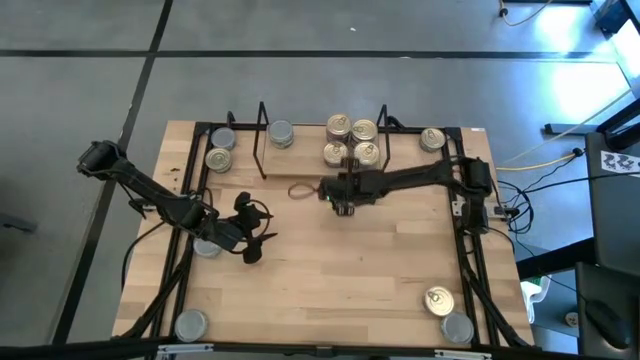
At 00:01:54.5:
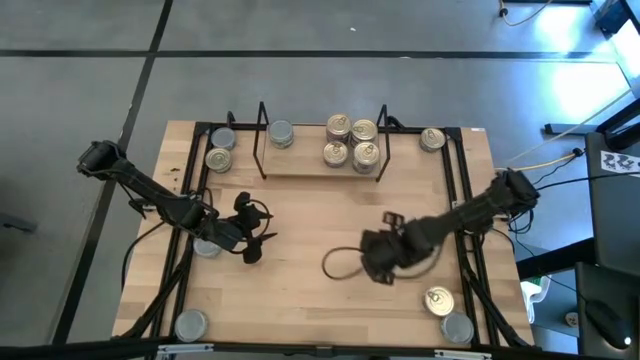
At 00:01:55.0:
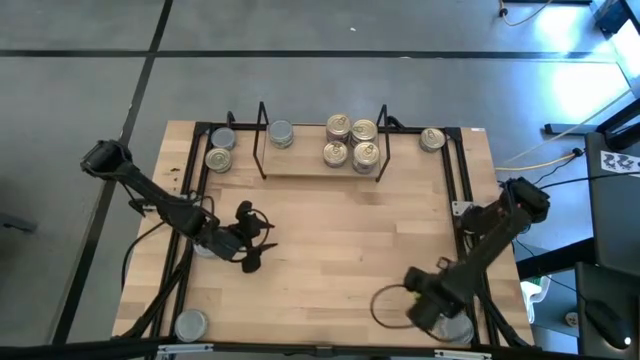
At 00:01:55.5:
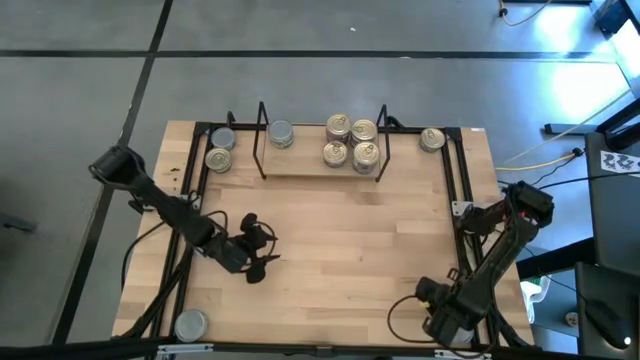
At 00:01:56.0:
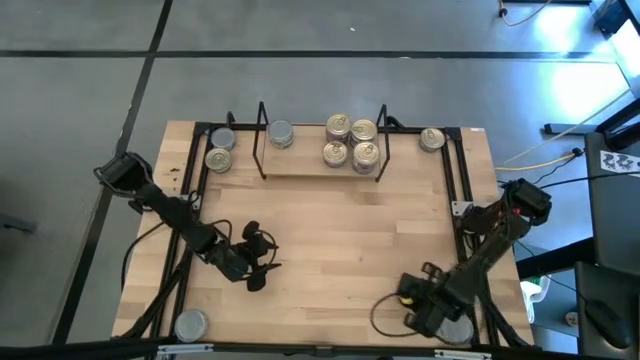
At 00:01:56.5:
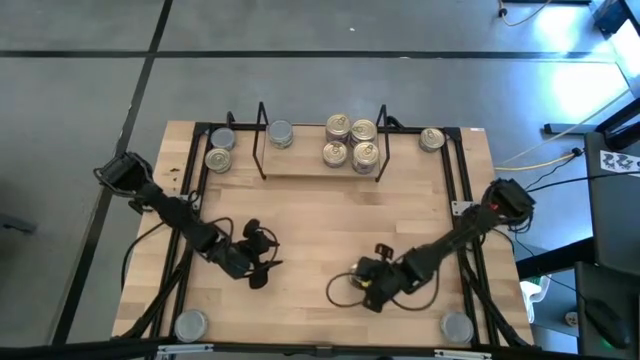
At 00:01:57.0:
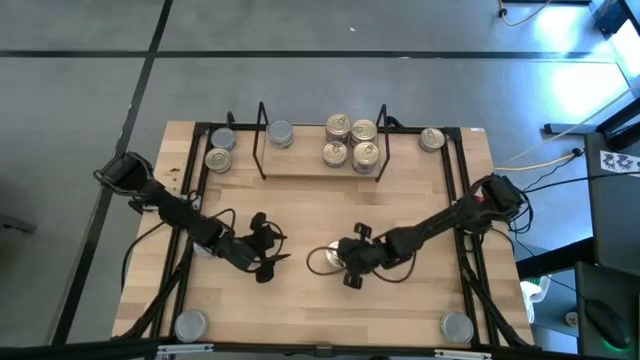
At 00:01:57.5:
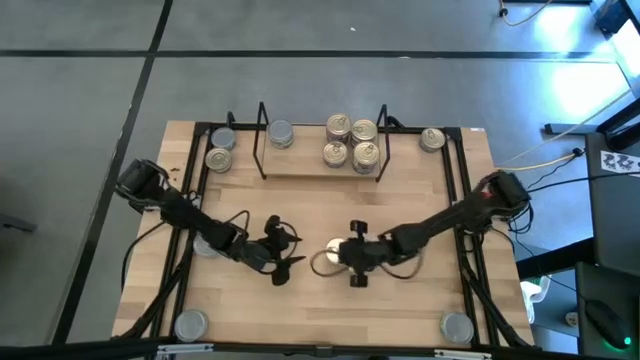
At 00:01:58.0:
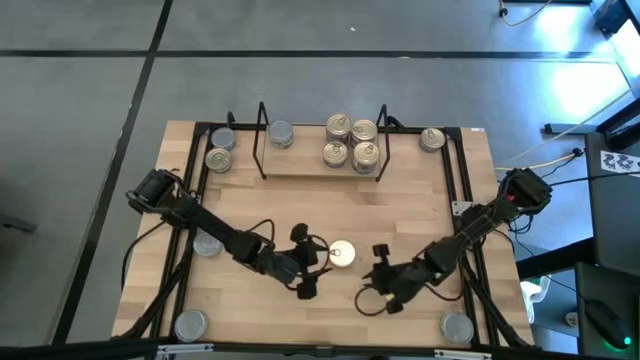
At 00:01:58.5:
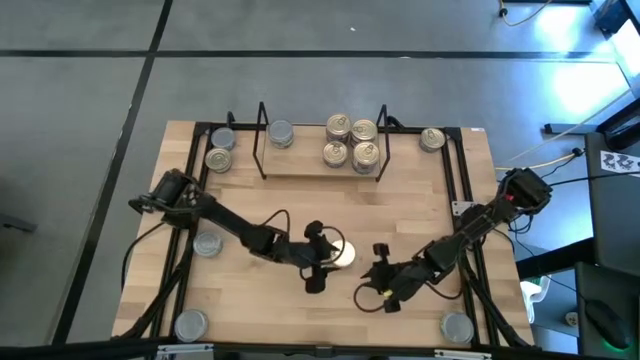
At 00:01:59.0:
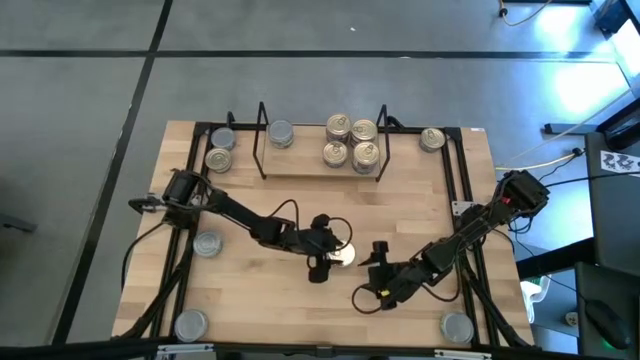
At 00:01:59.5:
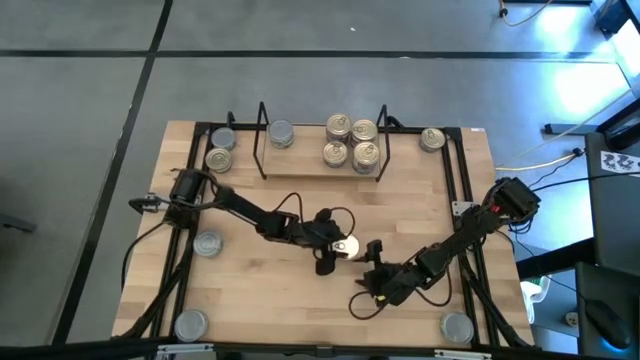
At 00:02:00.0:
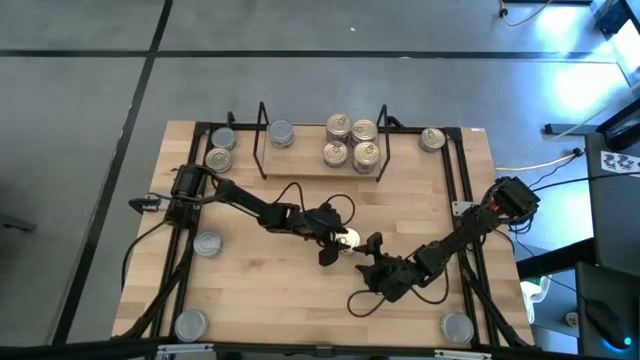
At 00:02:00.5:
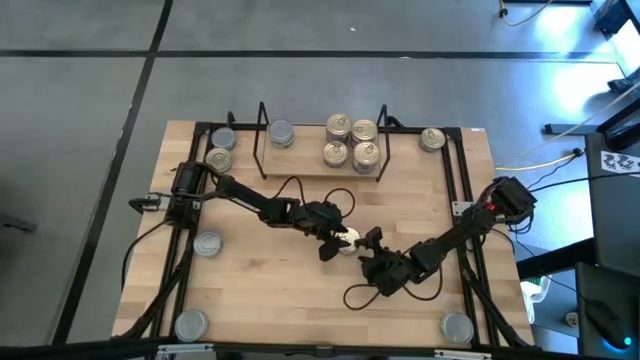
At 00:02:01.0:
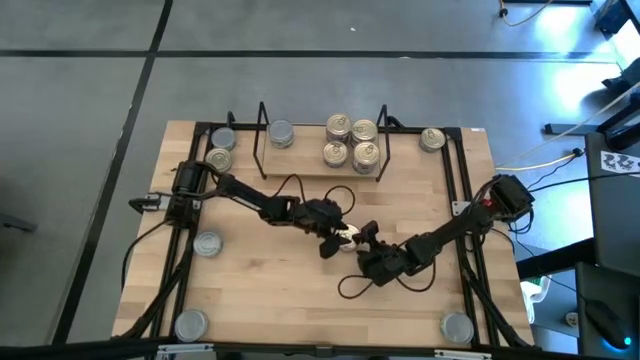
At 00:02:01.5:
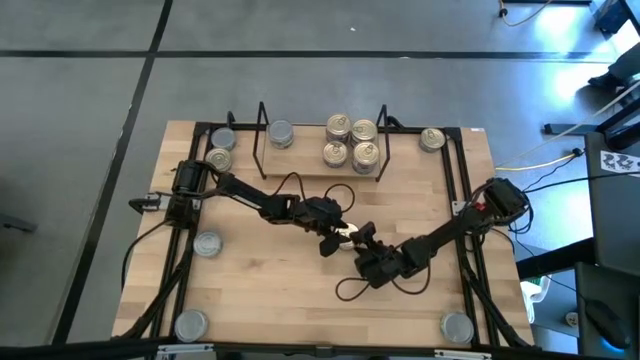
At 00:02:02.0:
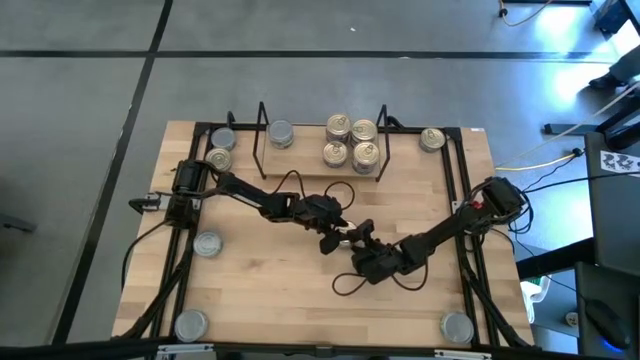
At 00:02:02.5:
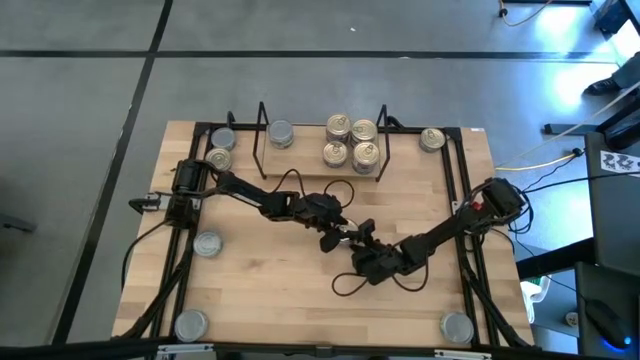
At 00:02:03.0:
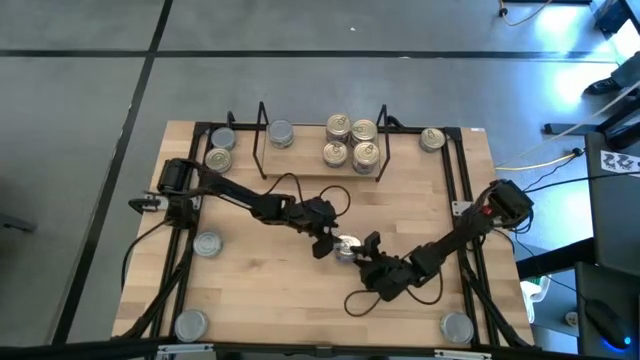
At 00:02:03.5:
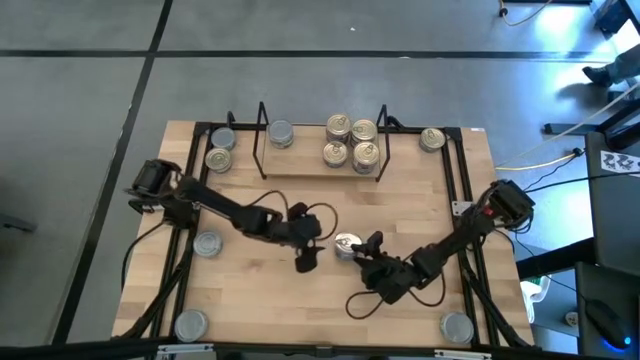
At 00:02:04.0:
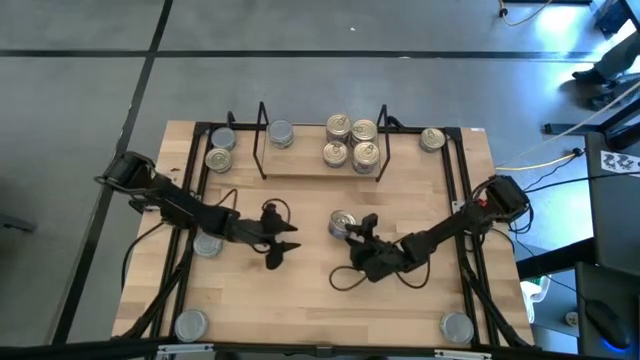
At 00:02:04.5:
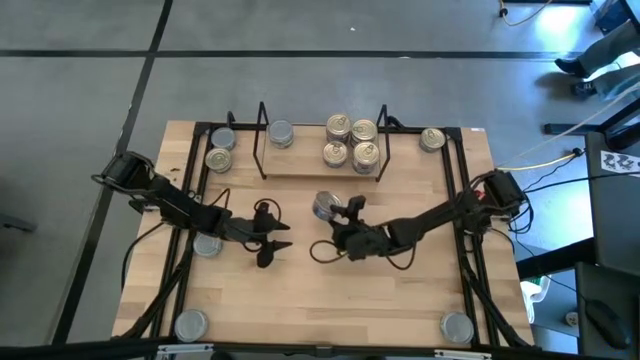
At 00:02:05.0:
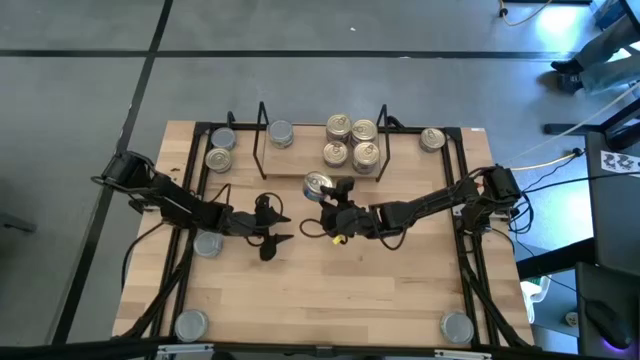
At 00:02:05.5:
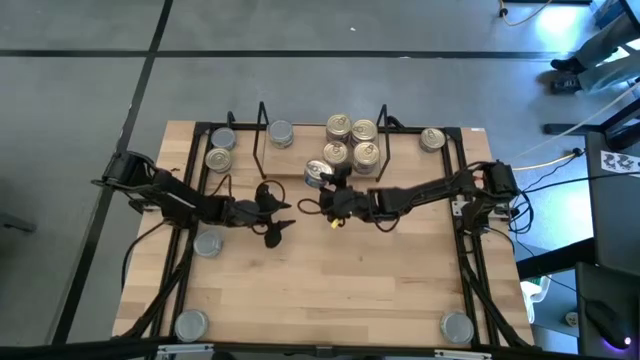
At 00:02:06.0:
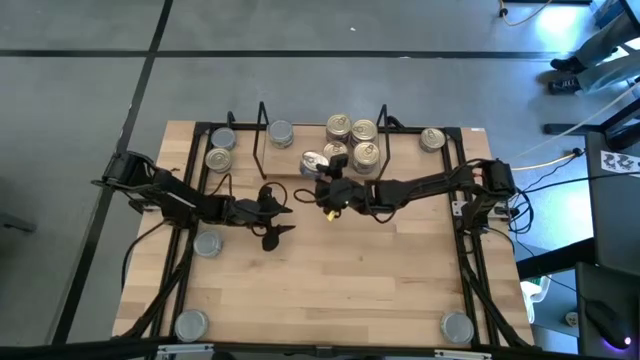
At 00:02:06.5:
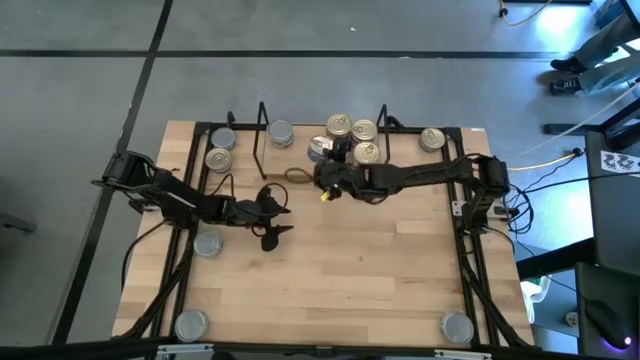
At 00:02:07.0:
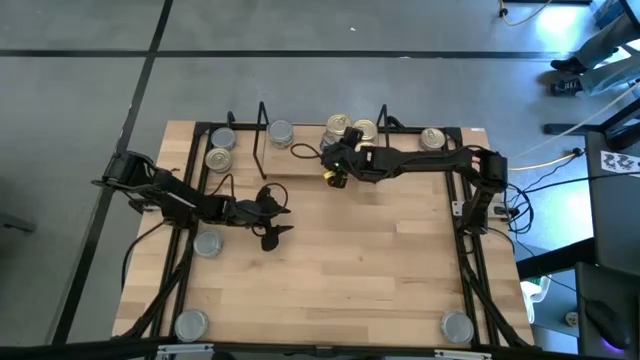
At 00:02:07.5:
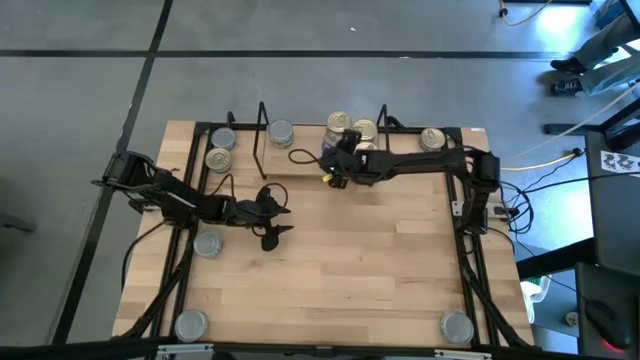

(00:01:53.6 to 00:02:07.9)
Task: Stack canned seafood by type on shelf
Stack the blue-pink tuna can on top of the other blue-pink can on the shelf

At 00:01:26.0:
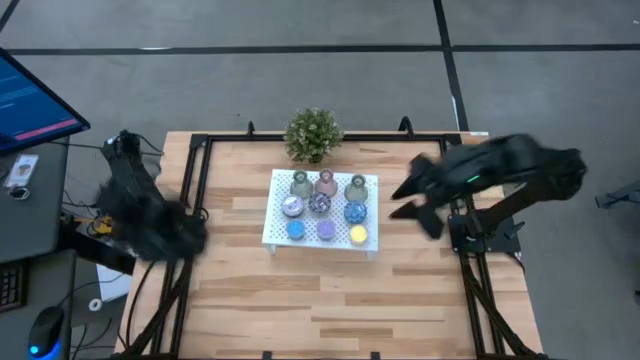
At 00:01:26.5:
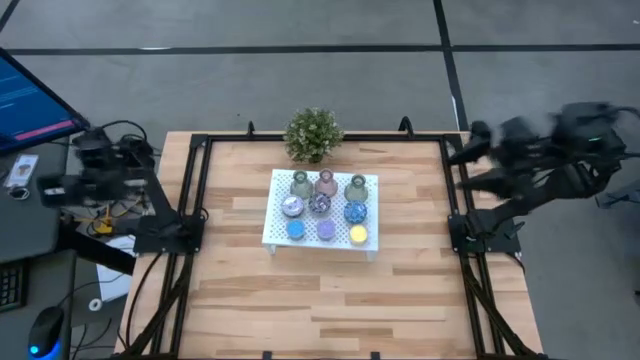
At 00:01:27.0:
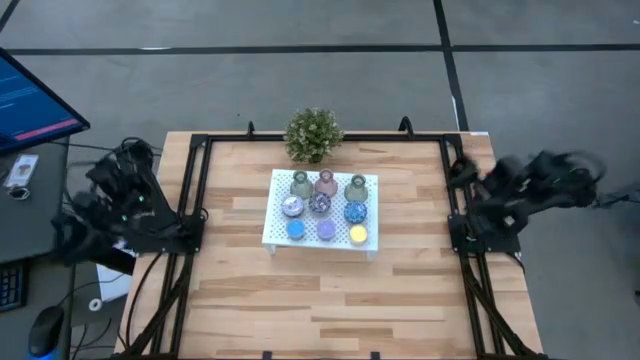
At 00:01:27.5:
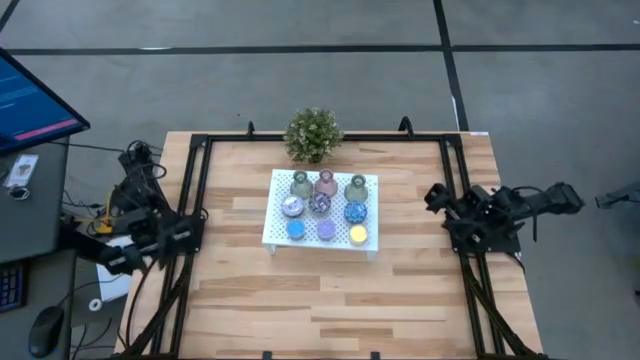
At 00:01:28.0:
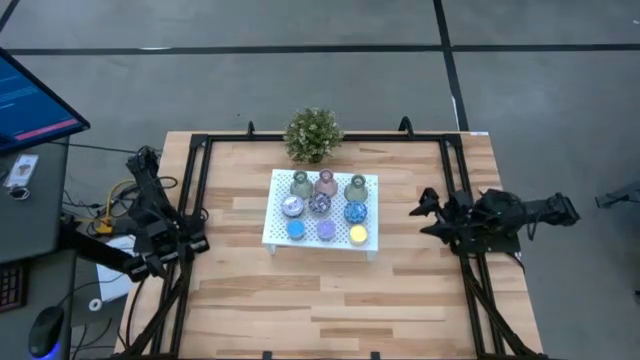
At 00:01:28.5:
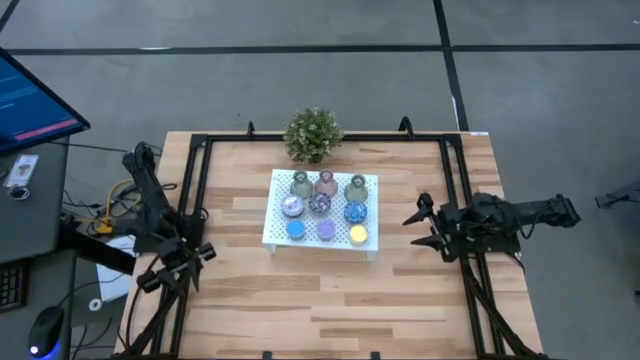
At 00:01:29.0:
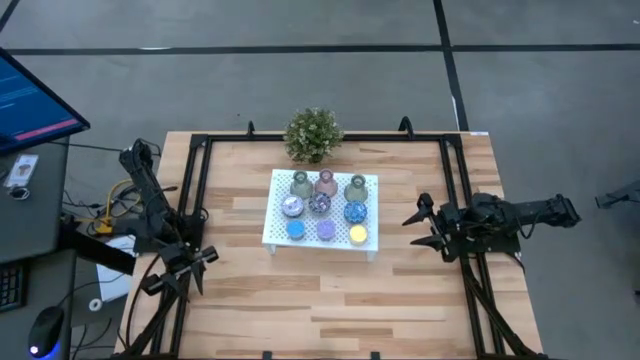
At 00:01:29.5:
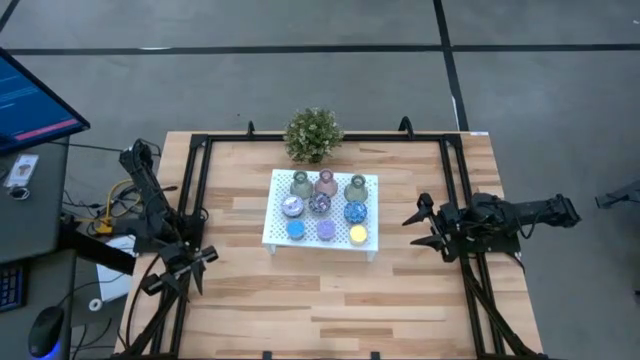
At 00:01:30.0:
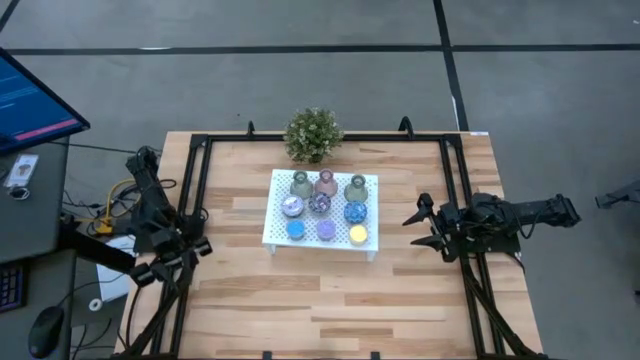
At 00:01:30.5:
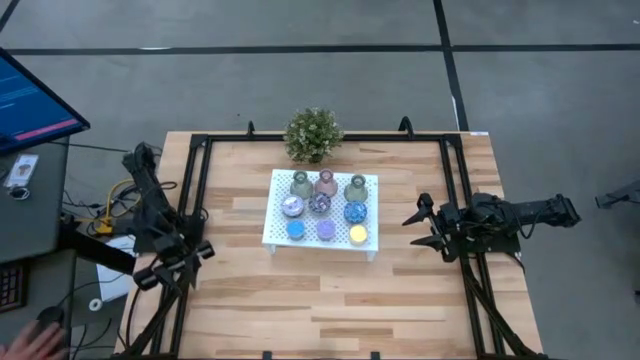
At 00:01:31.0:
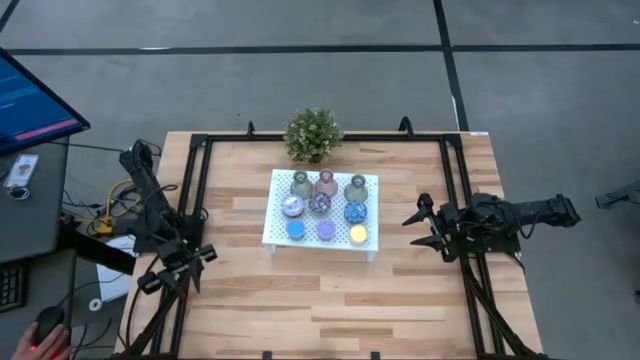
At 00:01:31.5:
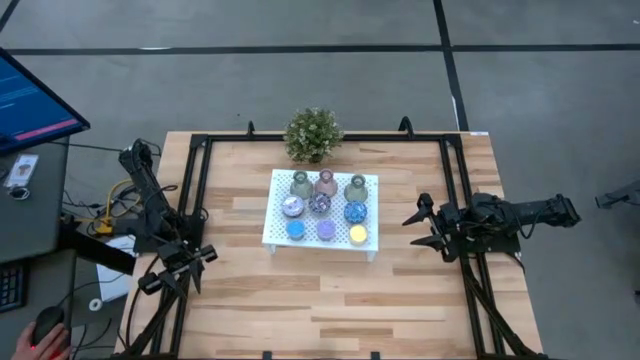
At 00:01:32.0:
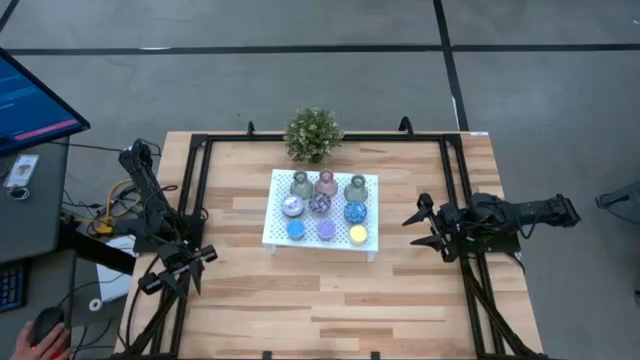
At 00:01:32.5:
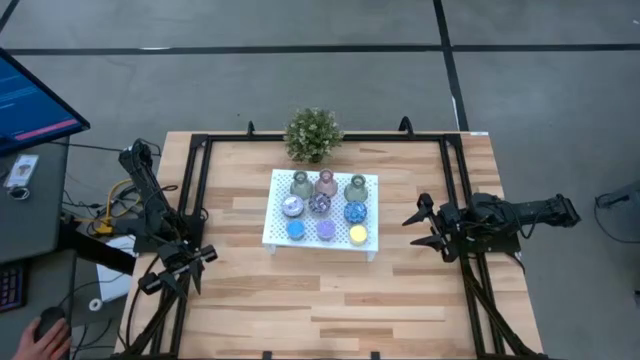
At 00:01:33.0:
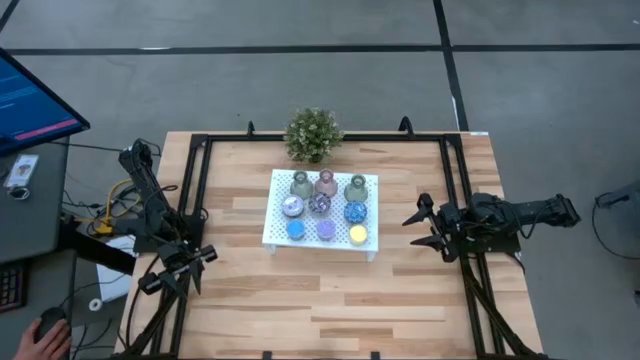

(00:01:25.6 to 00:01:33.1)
Task: Pick & Place candle stick holders
Return to Home Position
